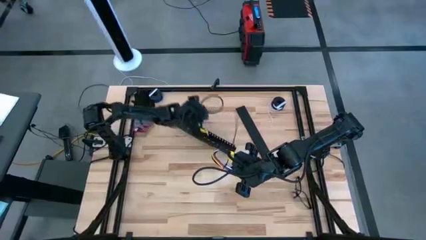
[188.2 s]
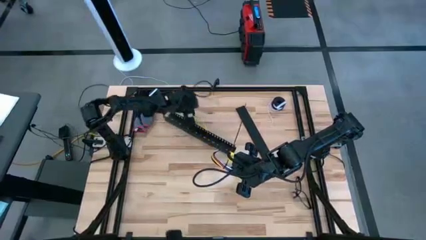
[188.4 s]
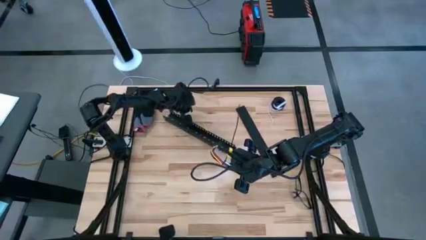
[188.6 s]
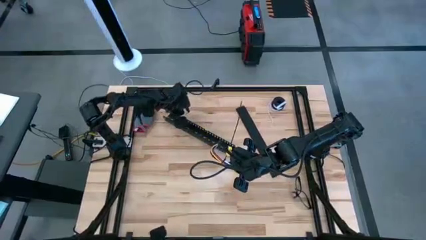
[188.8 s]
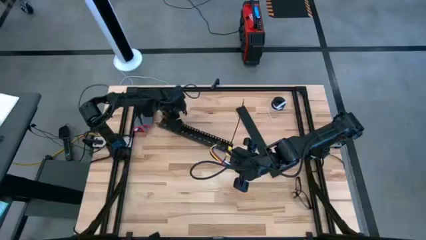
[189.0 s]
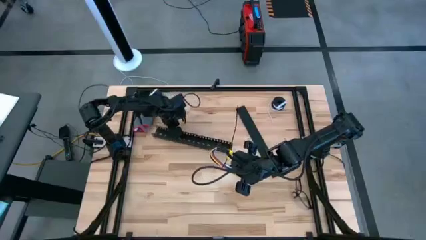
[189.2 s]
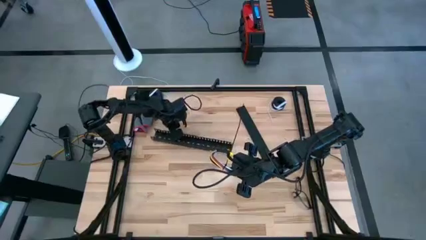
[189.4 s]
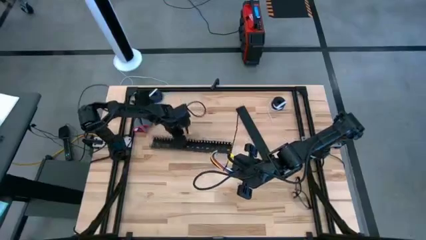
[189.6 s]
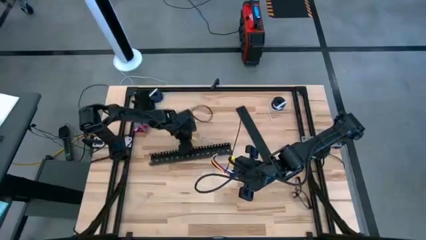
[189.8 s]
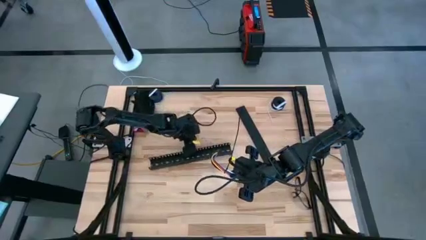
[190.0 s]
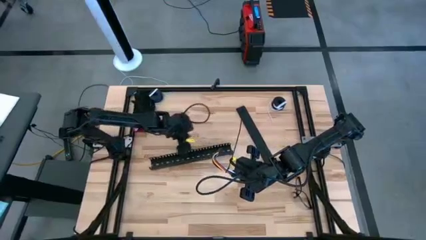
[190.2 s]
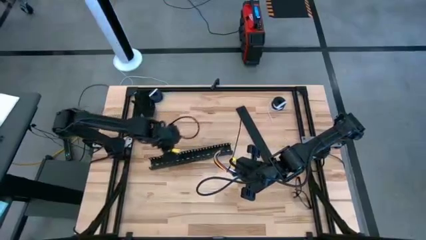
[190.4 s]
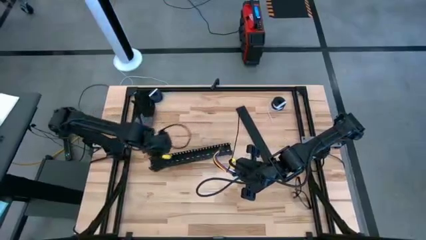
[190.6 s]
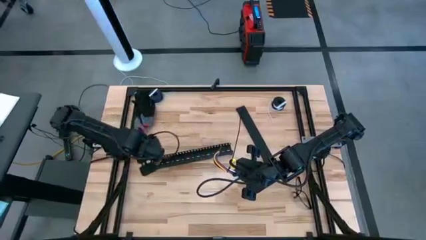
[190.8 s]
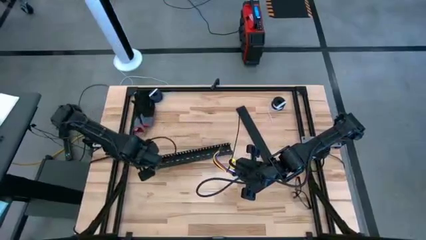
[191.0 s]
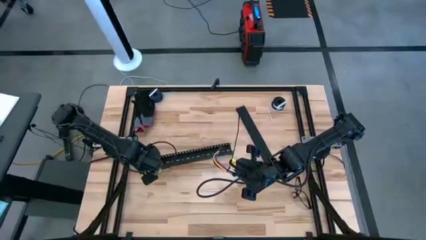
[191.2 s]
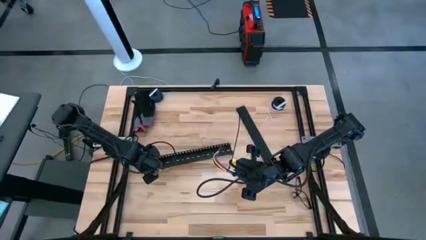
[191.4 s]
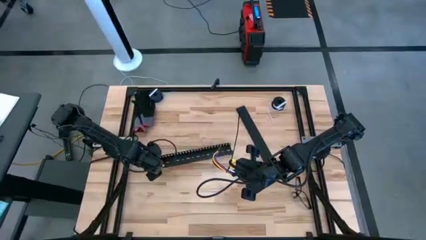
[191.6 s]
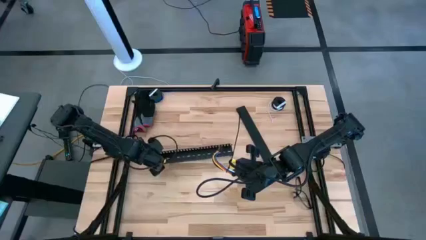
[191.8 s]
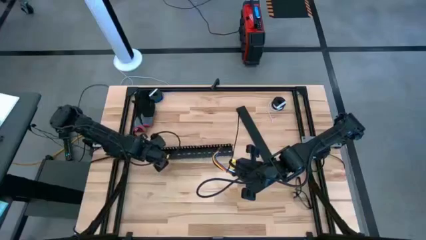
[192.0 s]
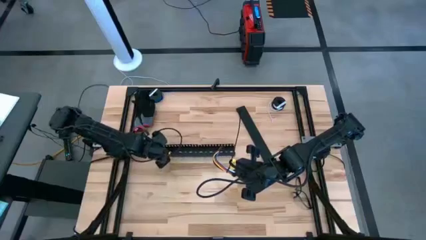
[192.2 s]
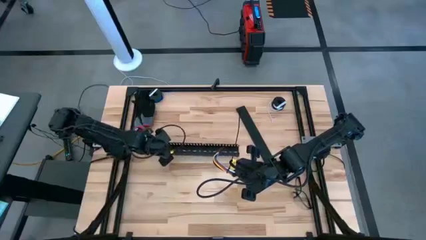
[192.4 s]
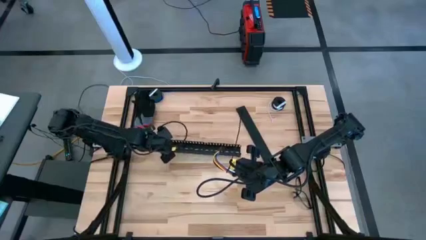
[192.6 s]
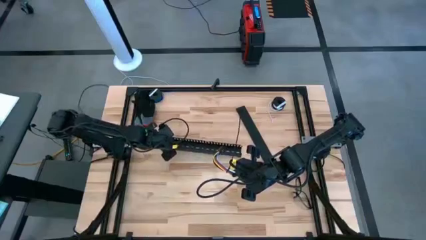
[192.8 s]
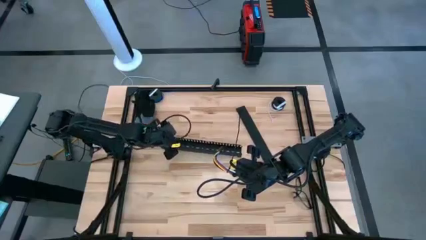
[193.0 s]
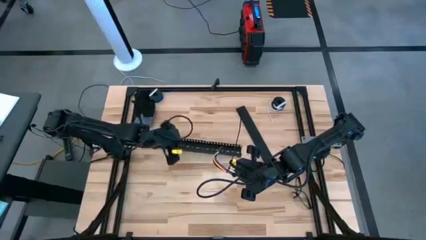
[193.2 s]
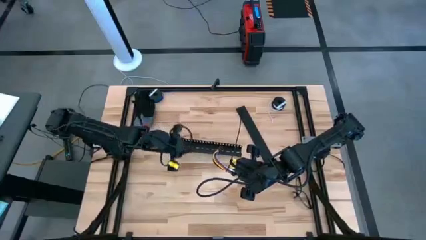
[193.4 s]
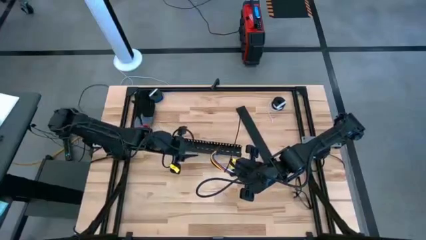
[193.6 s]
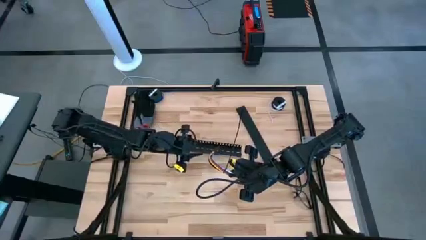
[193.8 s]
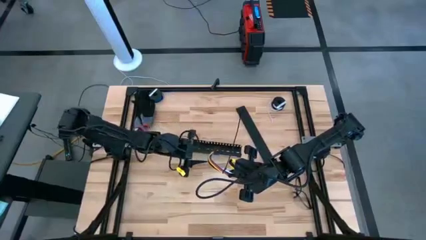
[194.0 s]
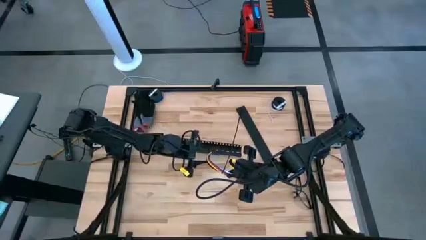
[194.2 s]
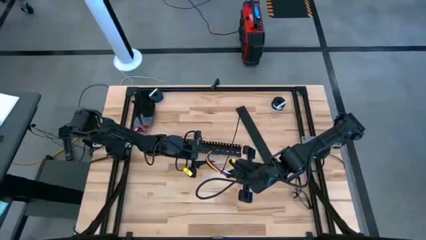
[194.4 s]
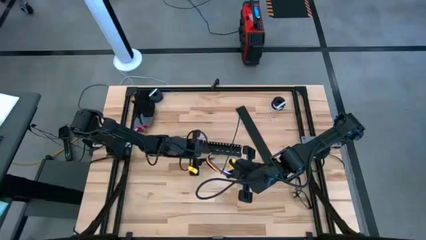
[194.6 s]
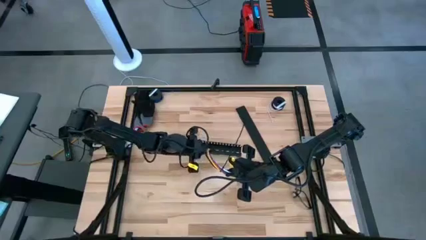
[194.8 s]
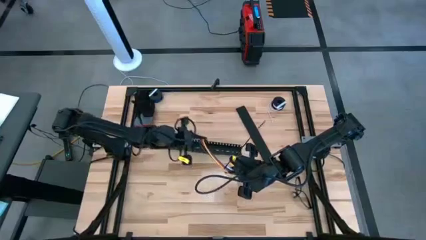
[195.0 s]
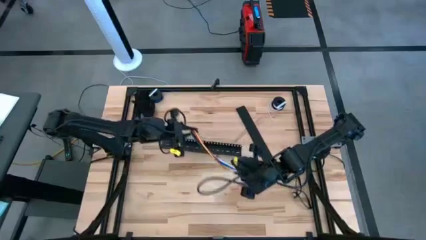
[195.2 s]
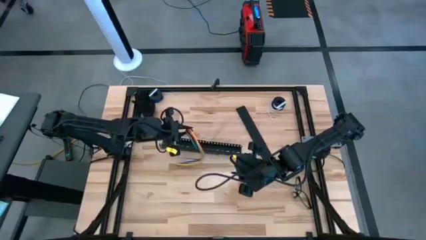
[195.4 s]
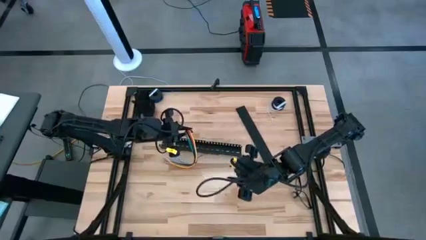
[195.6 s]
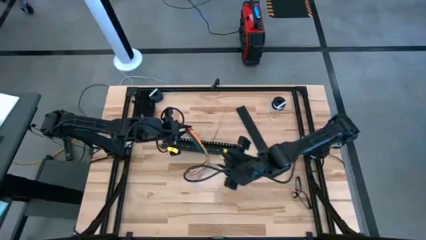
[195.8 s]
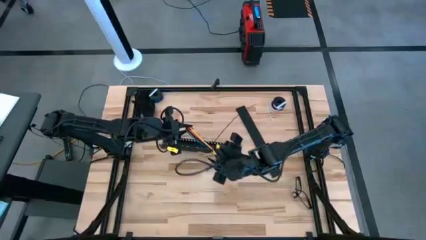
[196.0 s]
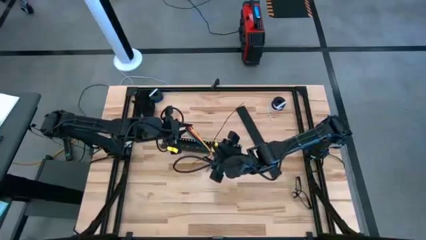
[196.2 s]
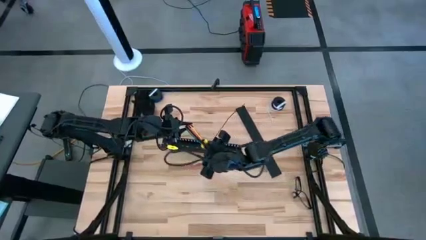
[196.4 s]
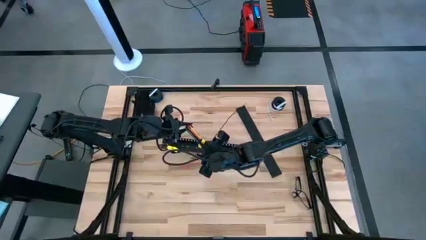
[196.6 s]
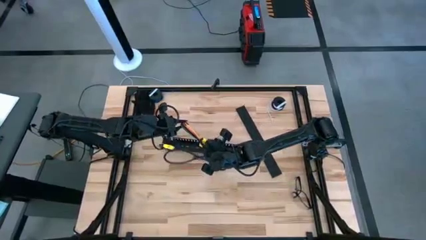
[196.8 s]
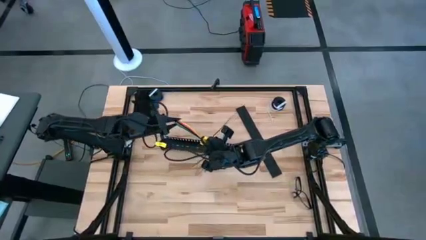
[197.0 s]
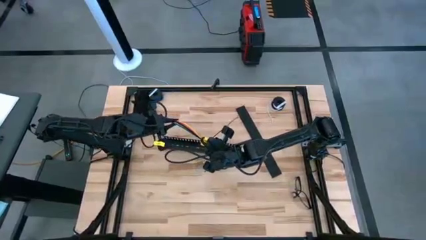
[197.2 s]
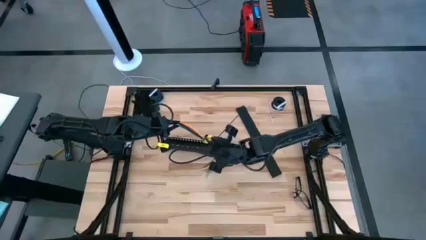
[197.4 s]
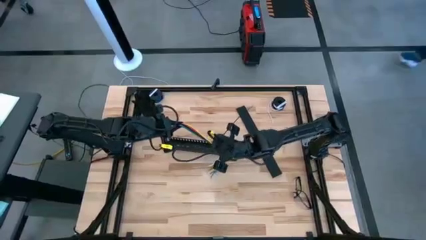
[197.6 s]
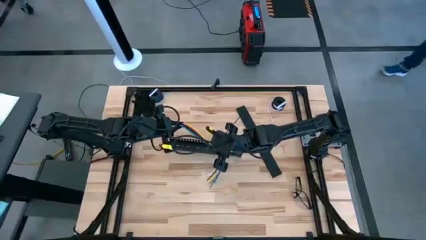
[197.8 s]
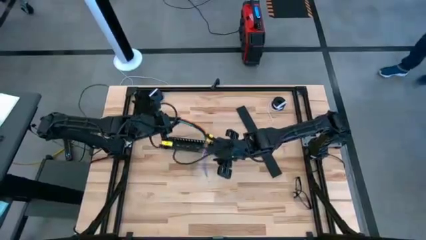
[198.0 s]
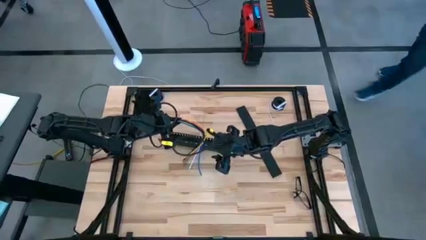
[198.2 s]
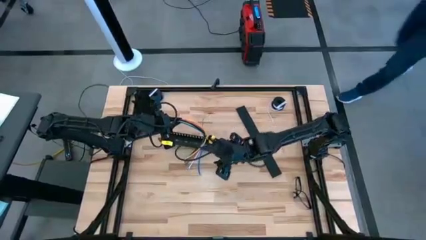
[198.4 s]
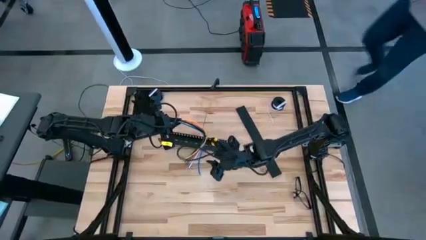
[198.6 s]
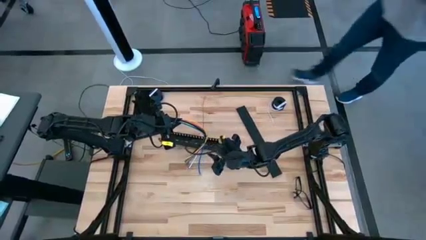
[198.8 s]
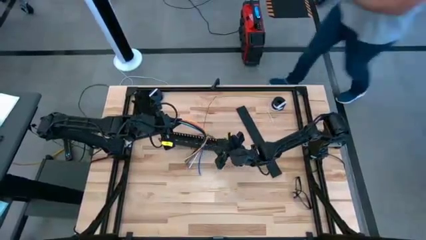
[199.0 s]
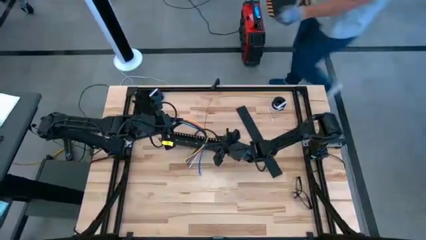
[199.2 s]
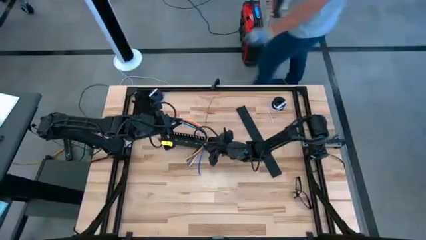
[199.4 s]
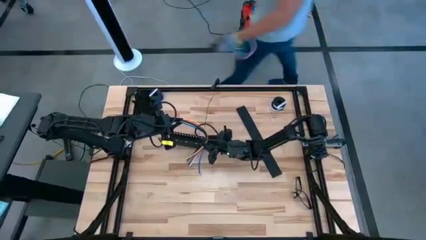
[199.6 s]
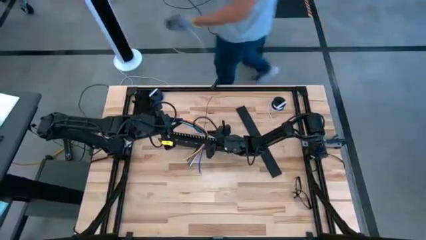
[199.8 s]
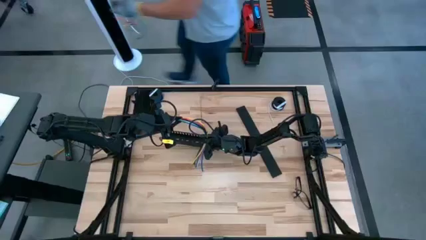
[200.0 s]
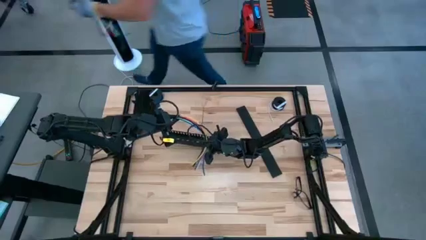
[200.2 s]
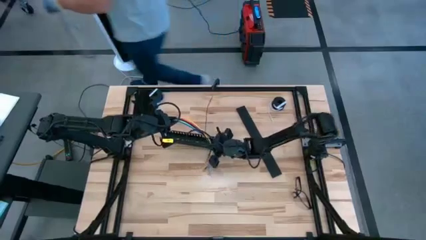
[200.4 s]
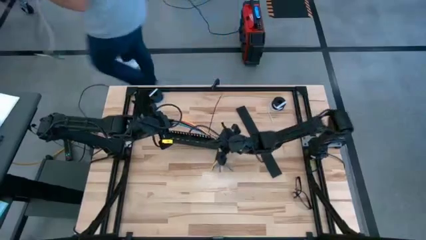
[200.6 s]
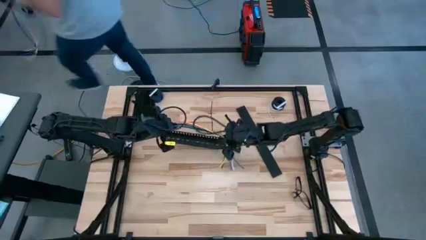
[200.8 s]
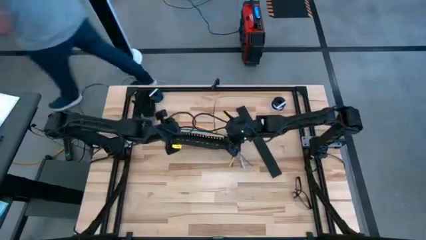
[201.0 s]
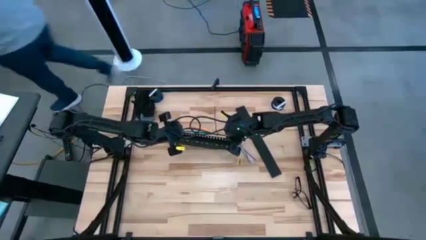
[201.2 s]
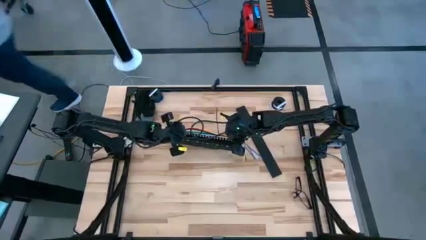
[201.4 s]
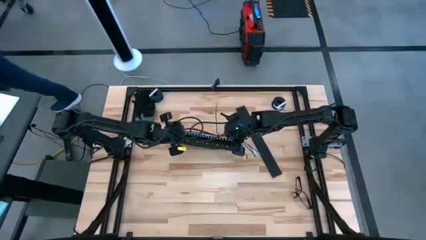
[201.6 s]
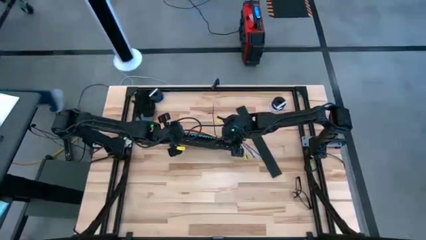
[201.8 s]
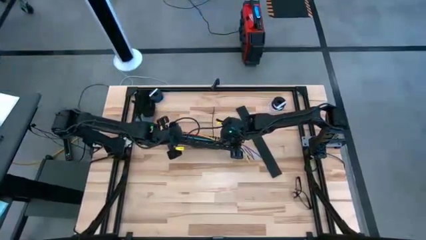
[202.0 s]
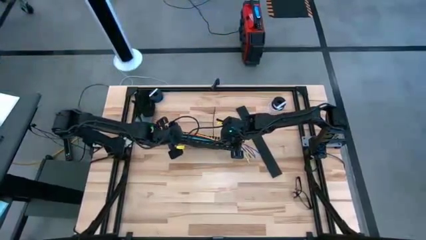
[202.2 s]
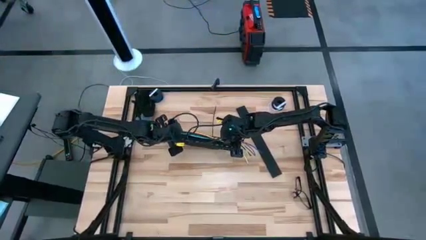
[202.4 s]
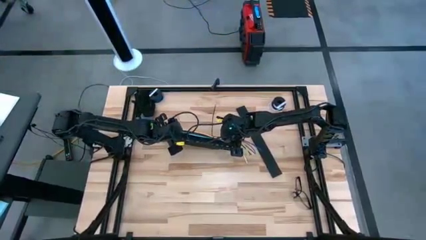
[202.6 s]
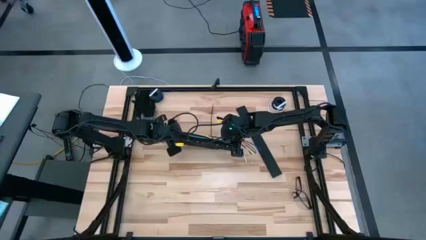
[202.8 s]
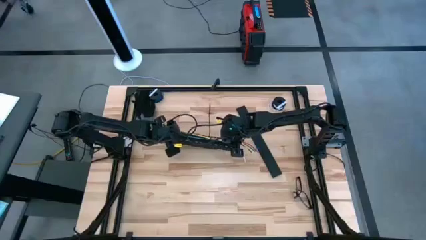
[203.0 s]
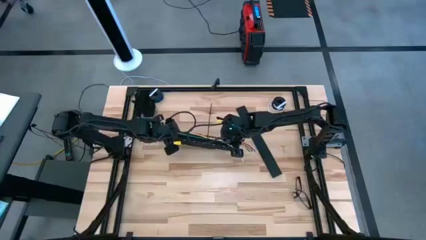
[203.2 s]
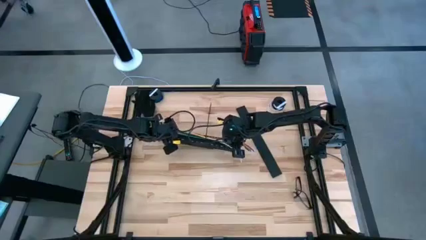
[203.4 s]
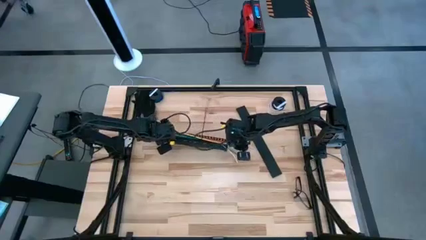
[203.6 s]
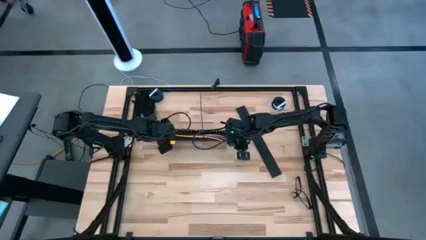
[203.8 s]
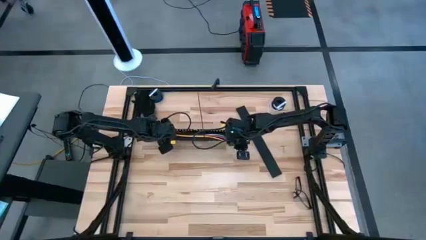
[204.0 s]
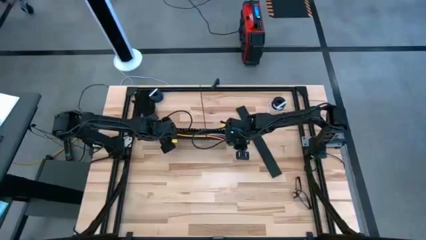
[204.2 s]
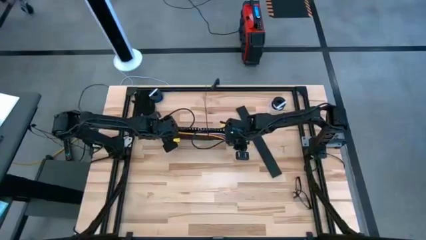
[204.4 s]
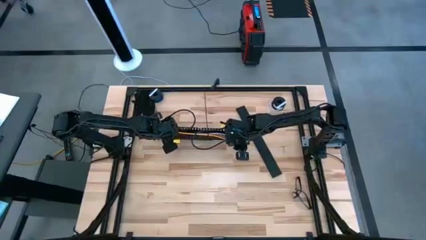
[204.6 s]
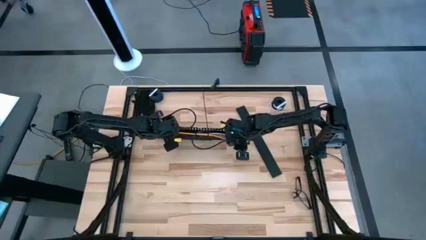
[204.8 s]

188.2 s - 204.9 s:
Task: Ziptie cables
Put the zip tied cable into the black cable duct
